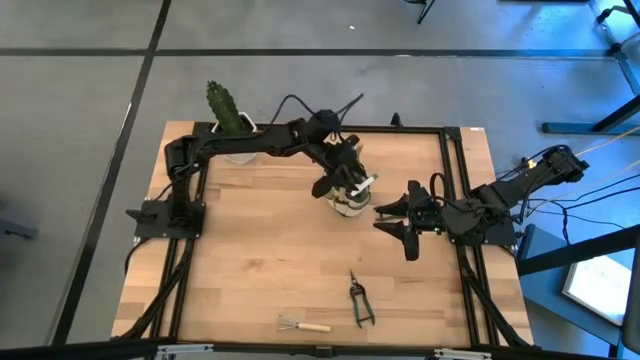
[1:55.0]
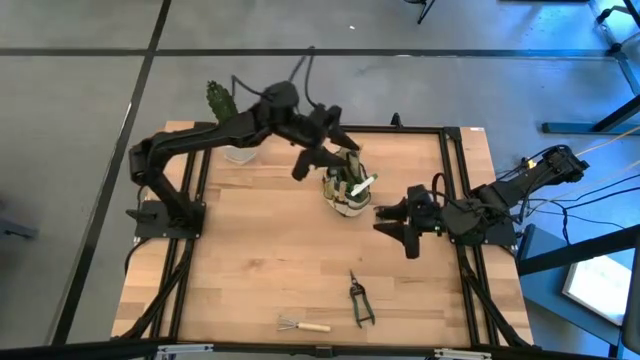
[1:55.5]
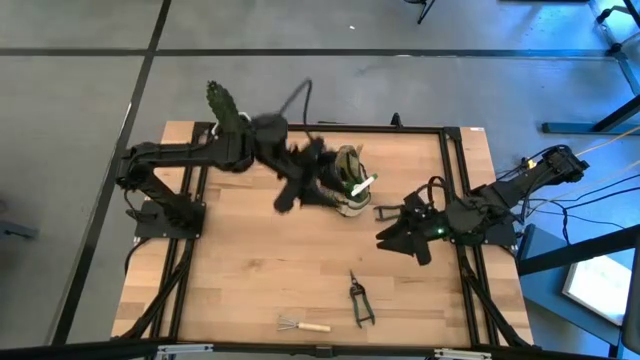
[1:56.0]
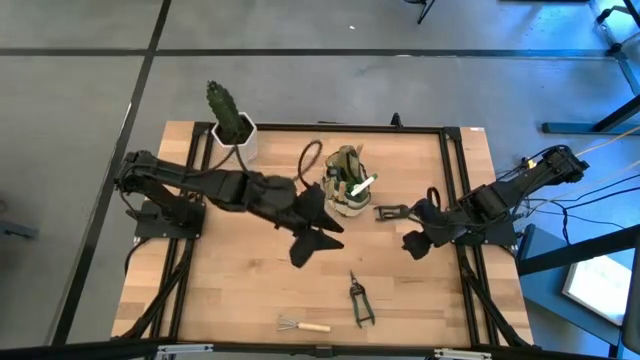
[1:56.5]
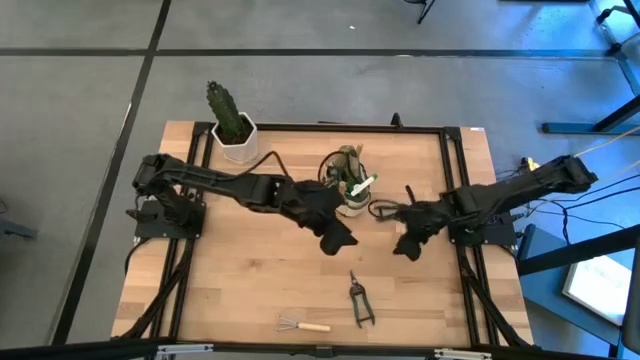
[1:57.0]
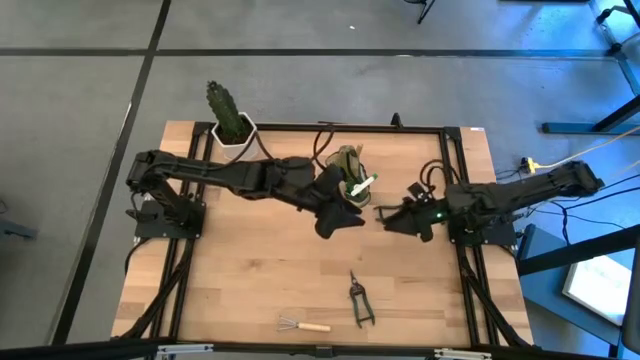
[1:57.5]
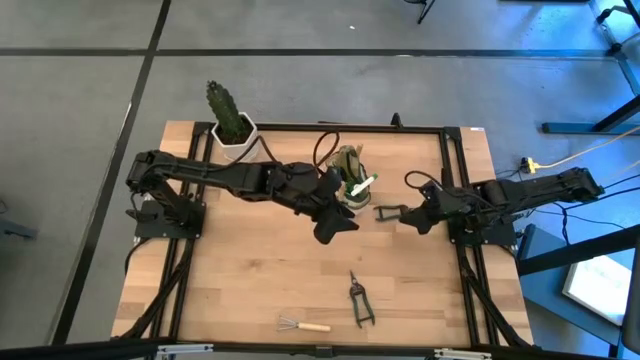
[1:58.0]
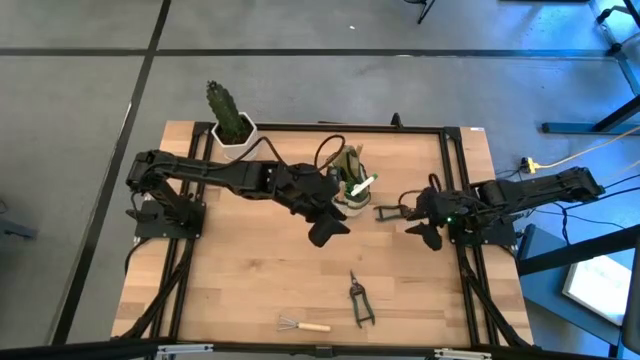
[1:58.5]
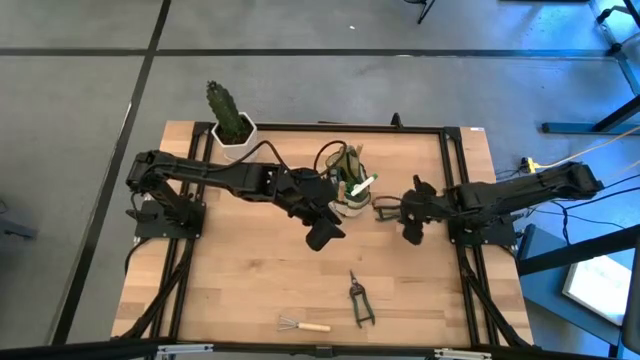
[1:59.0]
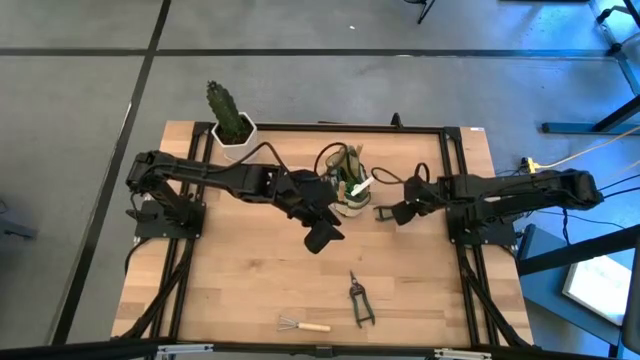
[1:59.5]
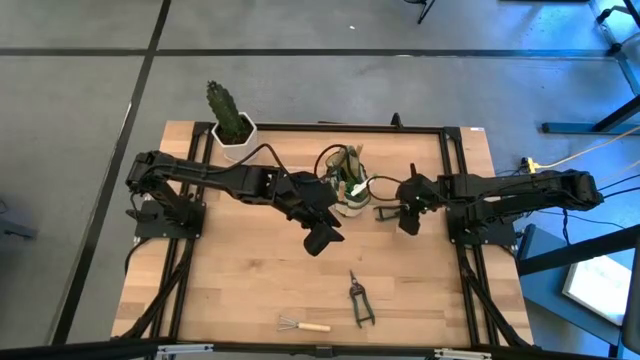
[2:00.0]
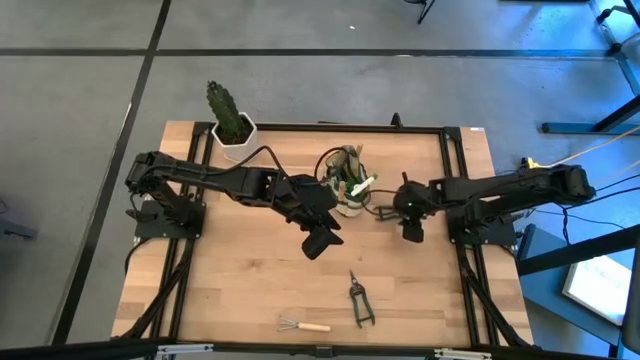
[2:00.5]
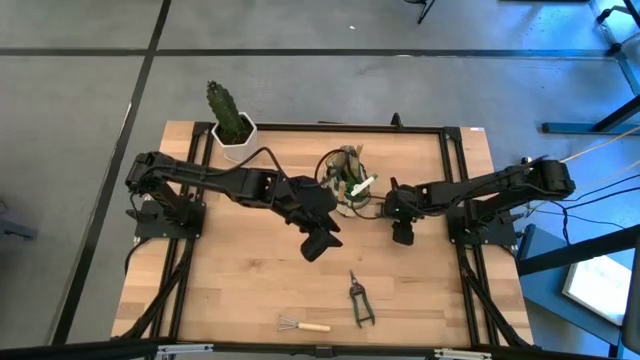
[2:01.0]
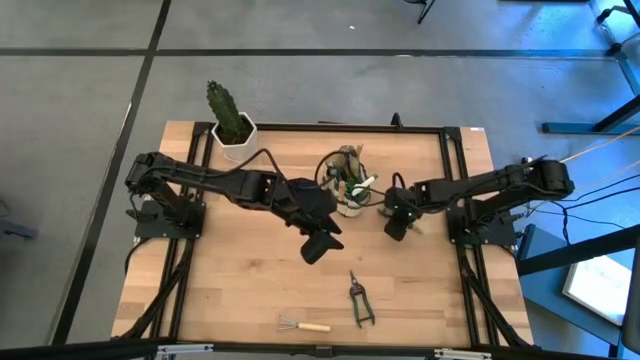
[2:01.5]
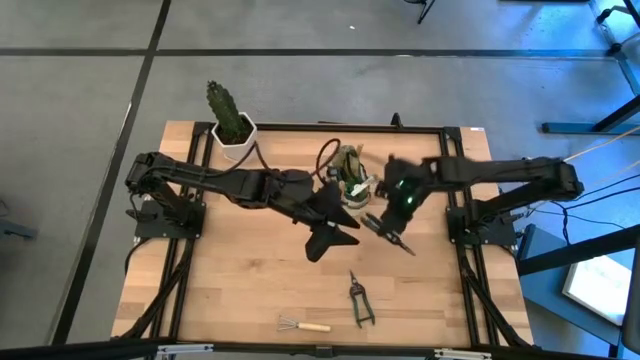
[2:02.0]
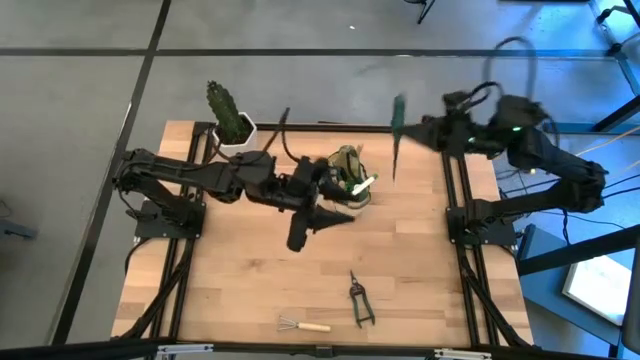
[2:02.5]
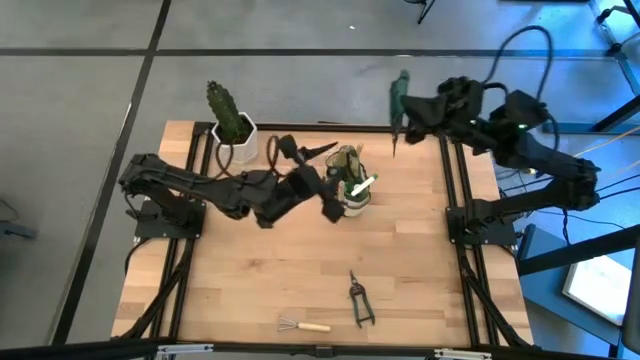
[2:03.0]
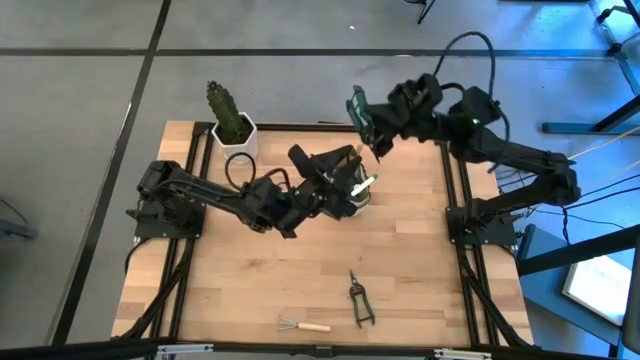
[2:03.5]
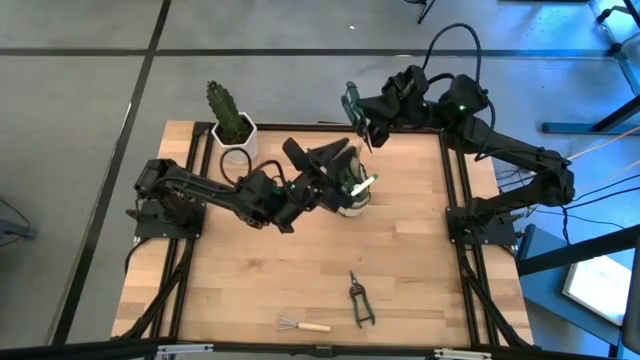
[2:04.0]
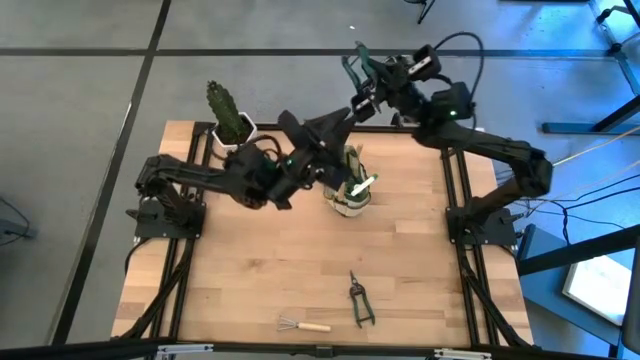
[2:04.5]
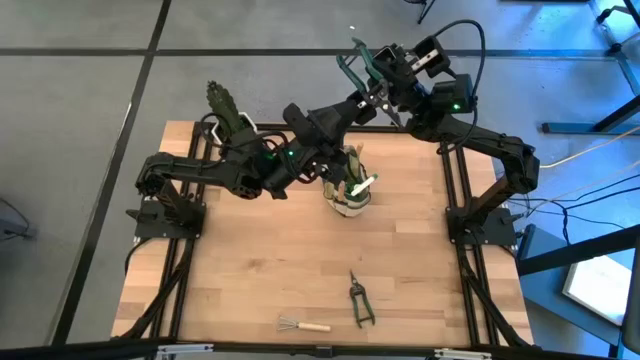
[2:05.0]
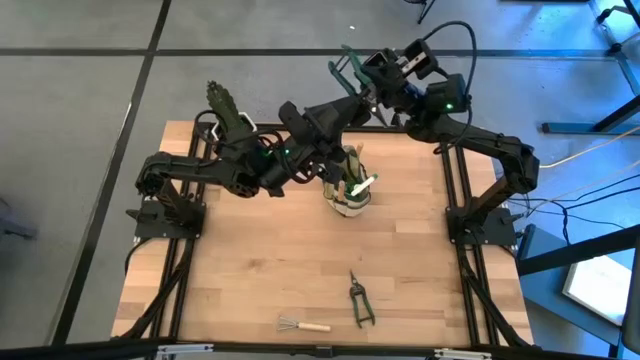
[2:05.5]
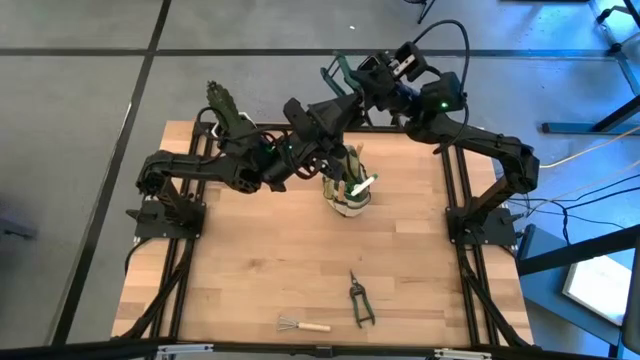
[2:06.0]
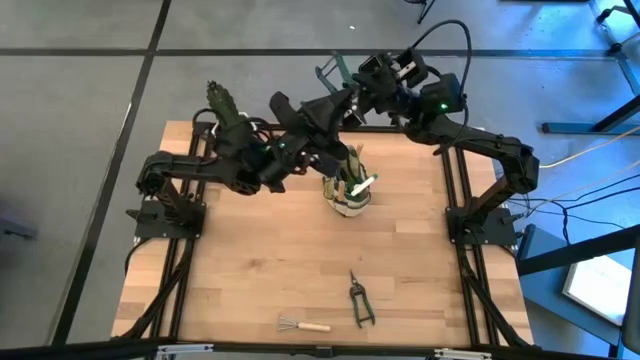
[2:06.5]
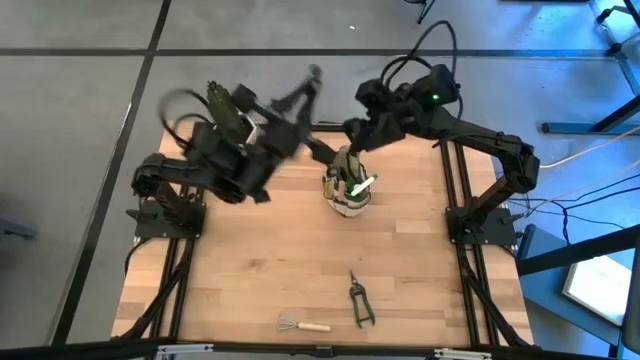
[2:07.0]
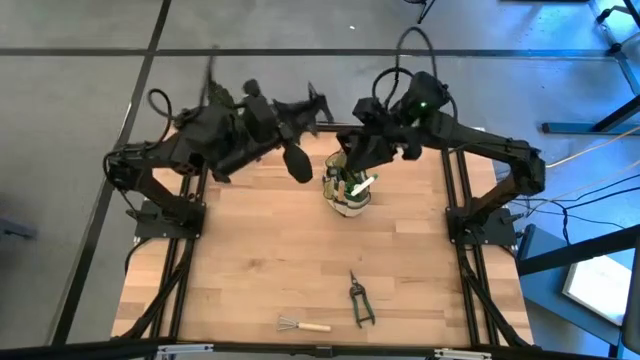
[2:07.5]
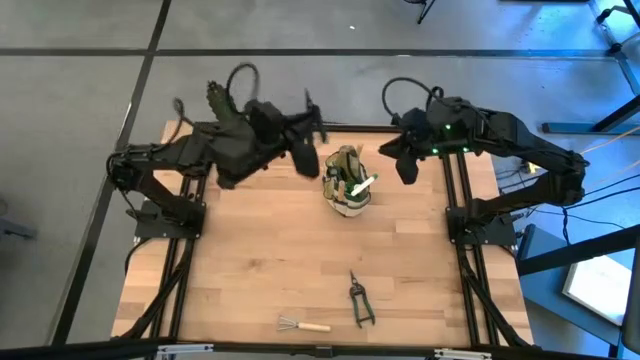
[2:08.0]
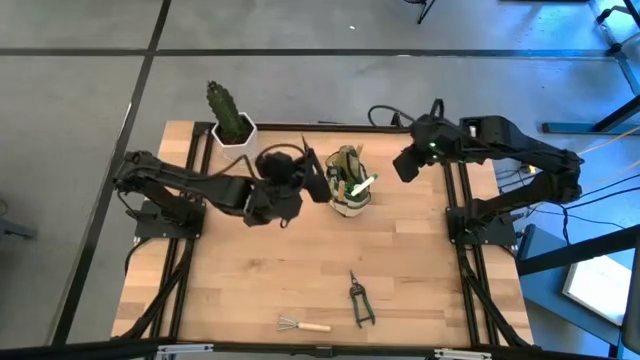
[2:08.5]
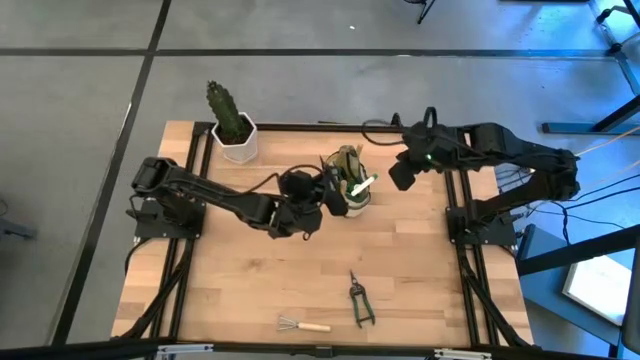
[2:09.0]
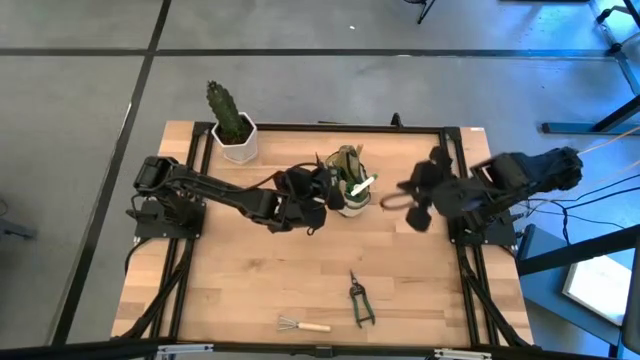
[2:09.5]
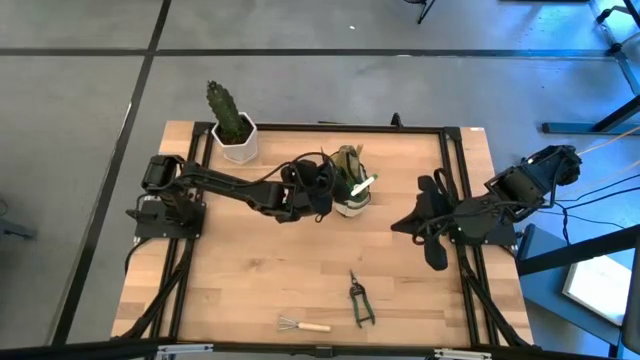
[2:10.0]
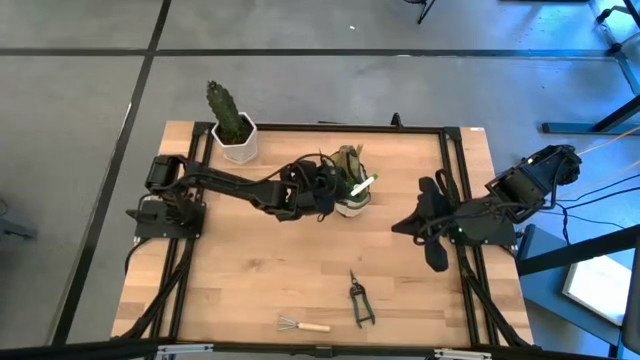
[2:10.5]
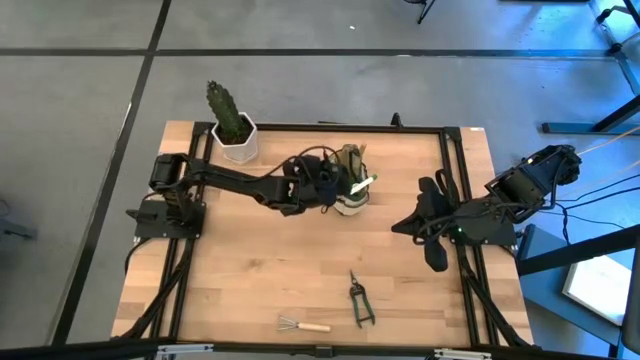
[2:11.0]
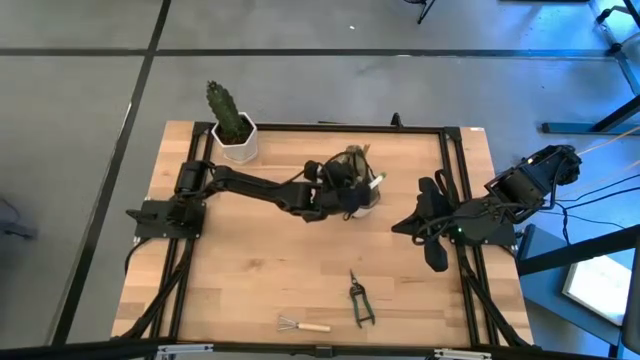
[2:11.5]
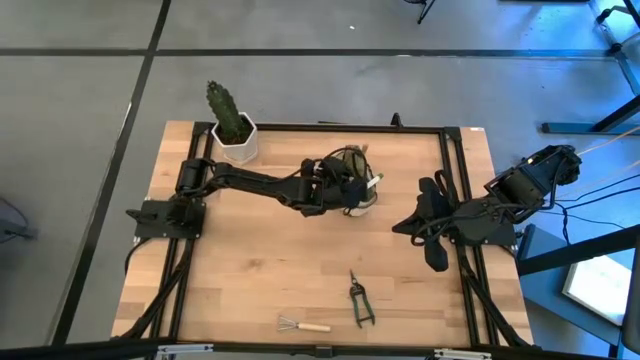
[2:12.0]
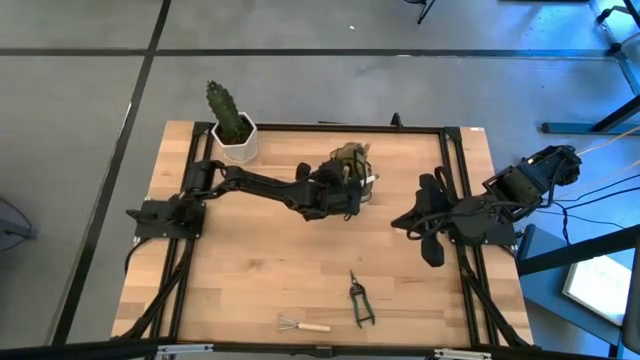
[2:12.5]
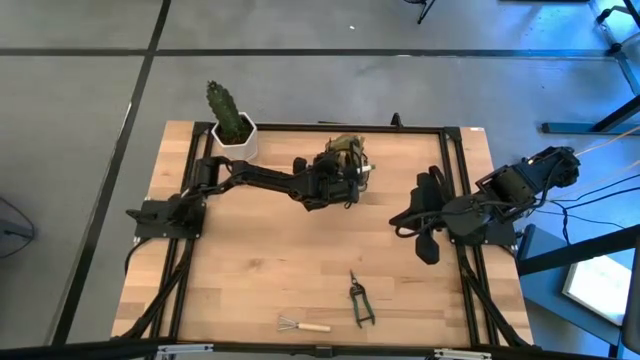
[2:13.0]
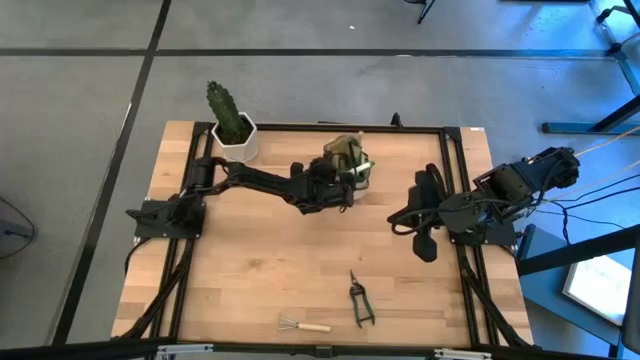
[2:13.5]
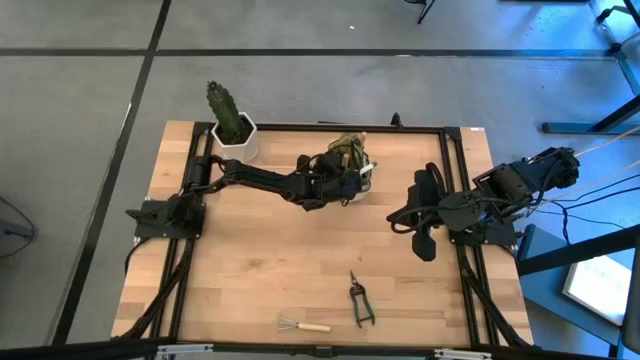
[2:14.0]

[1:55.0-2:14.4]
Task: Pick & Place Garden tools in Gardening bag
Put the top fruit pruner into the gardening bag

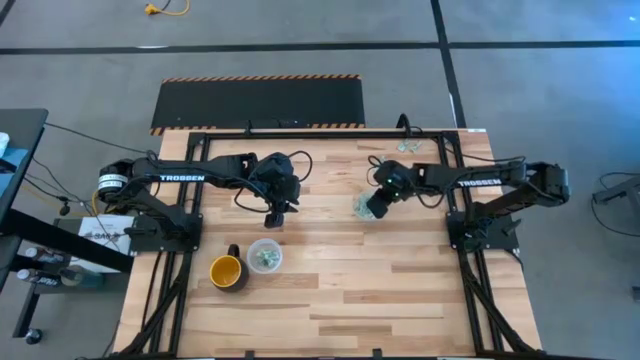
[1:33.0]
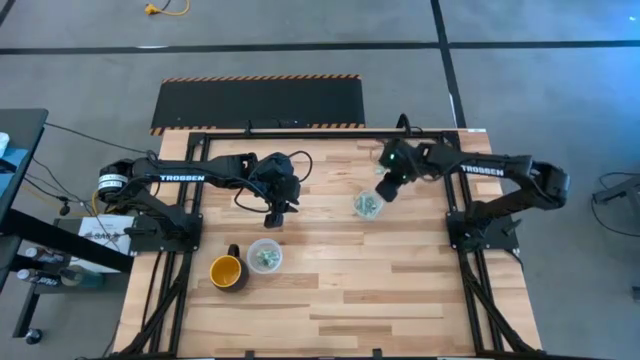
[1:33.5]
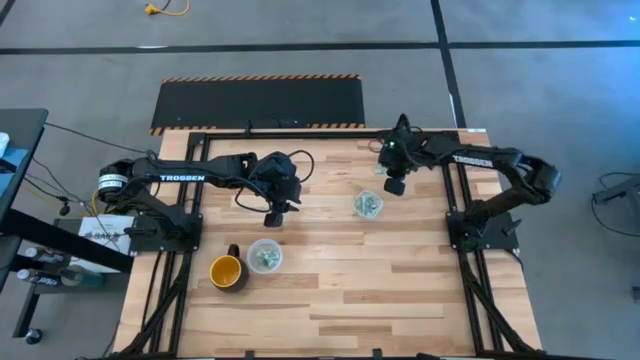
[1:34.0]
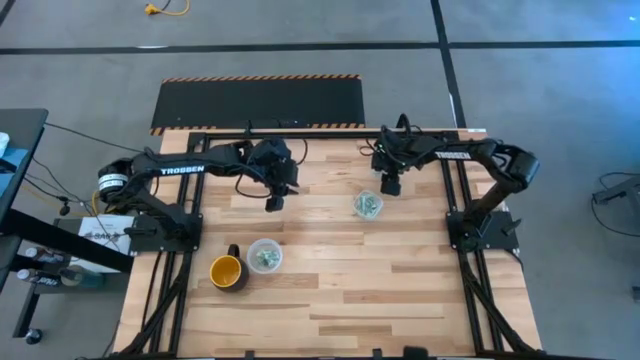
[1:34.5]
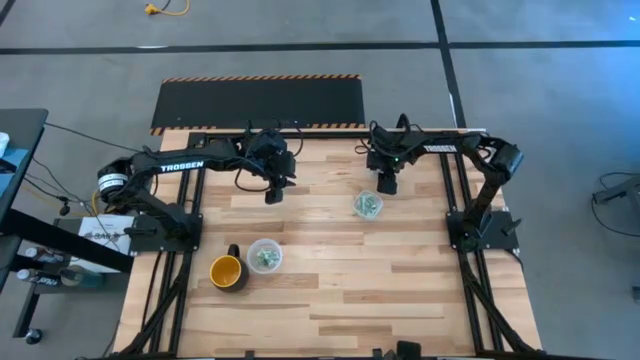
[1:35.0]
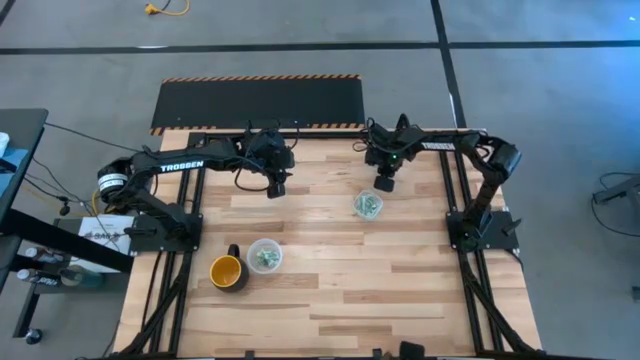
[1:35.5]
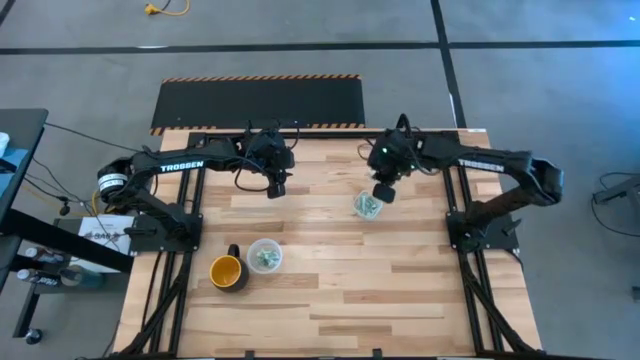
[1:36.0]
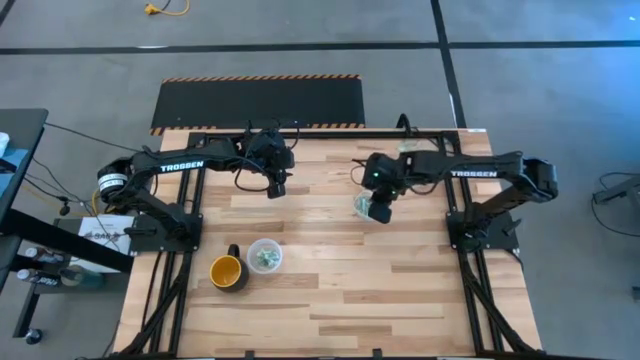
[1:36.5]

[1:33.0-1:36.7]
Task: Pick and place Stevia / Truvia into bins
Put the white stevia packet into the square transparent container
